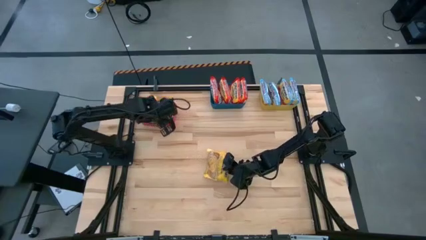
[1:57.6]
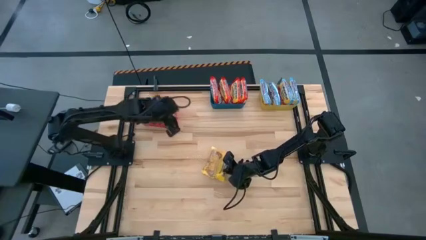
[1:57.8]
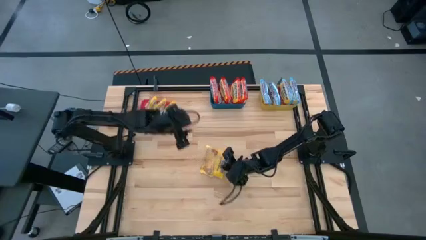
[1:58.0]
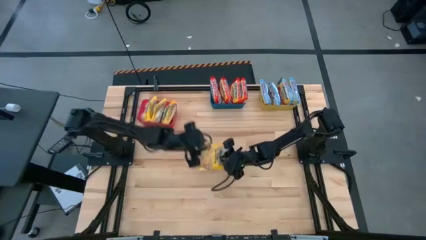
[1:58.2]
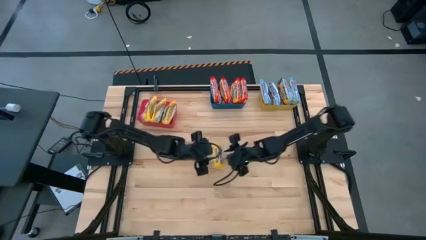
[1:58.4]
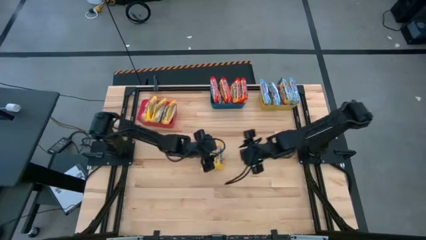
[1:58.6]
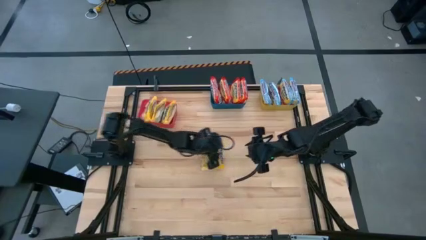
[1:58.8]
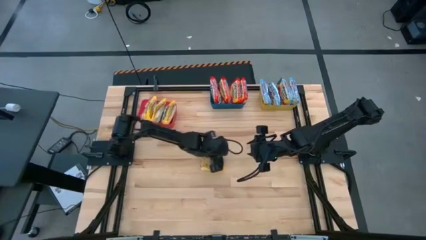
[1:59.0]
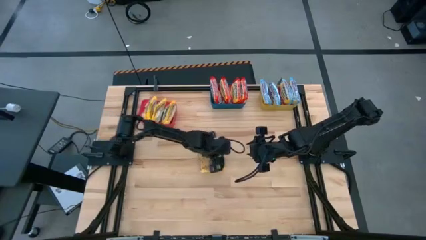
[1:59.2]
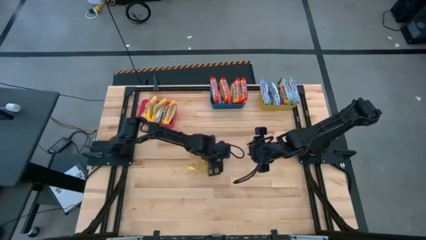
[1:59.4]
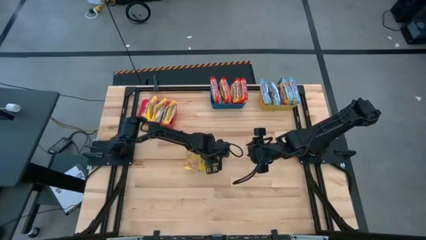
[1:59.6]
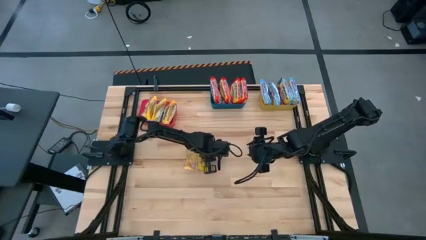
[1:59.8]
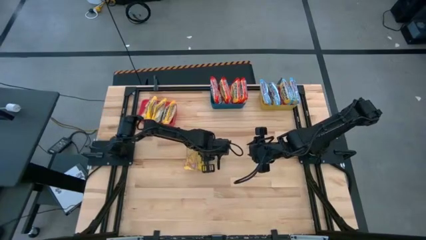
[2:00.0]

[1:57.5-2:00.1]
Task: Sort Maruchan noodles
Put the yellow noodle pack into the red bin

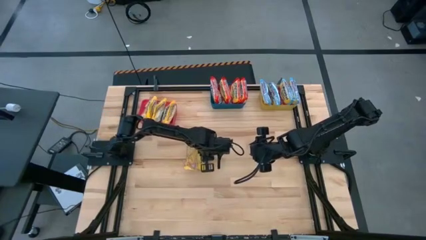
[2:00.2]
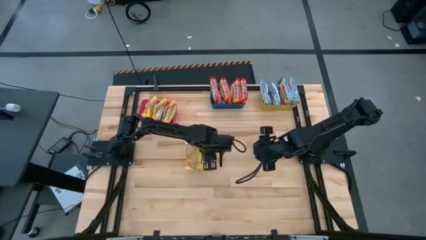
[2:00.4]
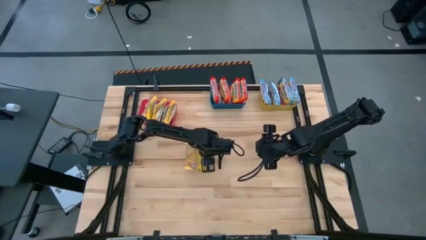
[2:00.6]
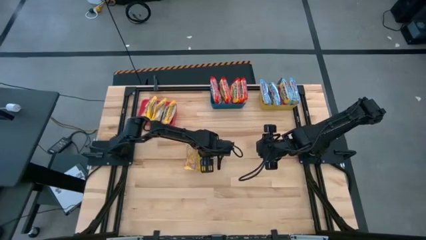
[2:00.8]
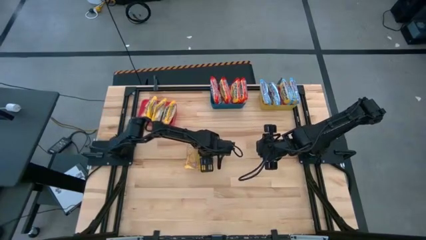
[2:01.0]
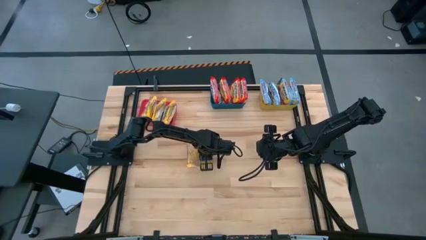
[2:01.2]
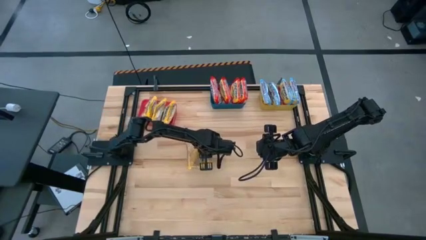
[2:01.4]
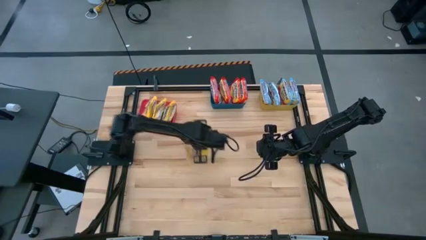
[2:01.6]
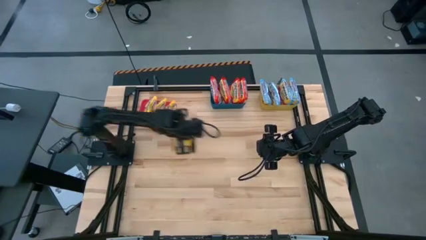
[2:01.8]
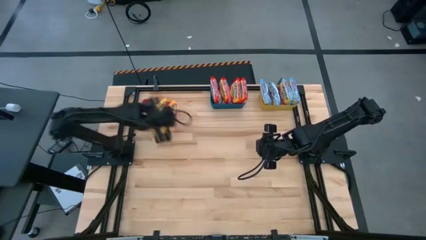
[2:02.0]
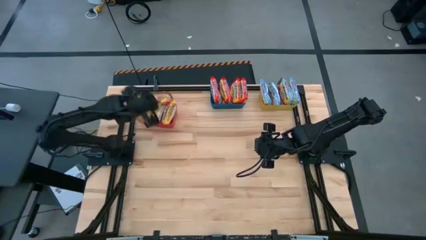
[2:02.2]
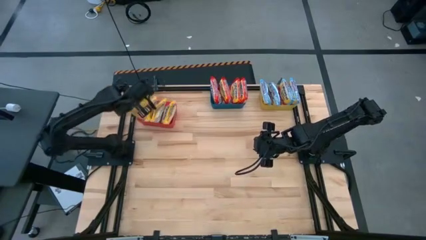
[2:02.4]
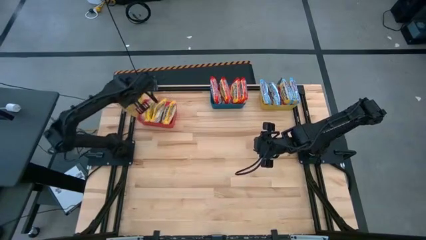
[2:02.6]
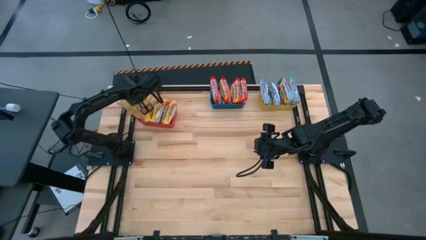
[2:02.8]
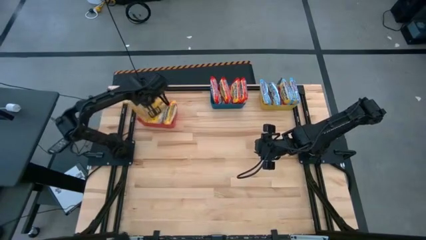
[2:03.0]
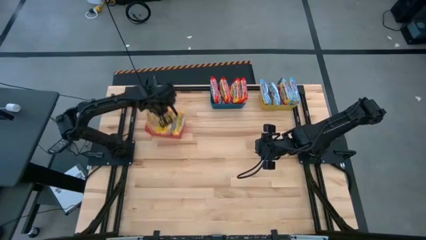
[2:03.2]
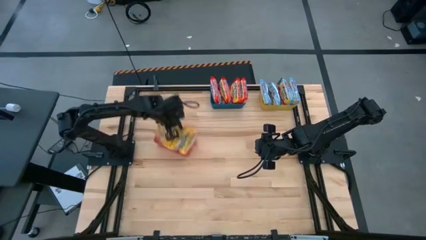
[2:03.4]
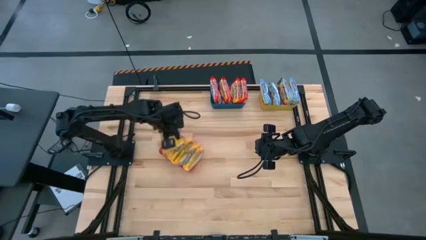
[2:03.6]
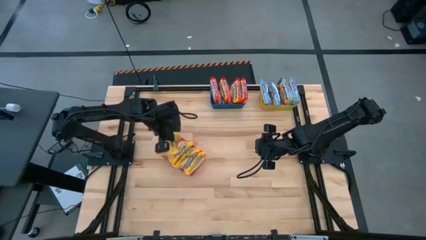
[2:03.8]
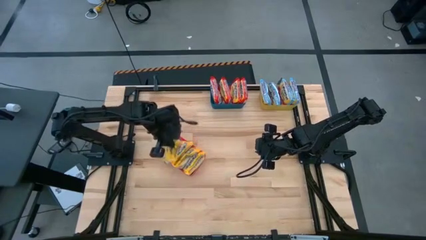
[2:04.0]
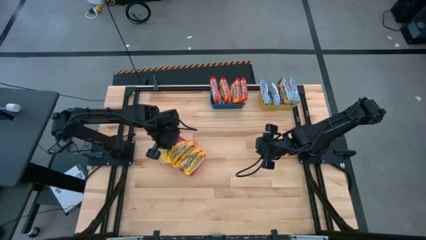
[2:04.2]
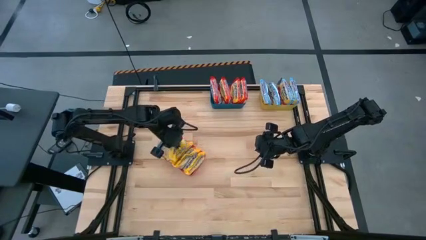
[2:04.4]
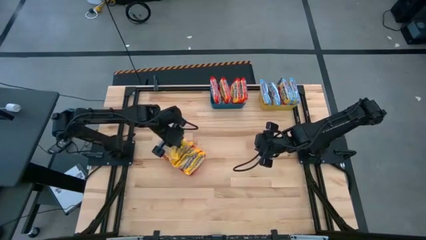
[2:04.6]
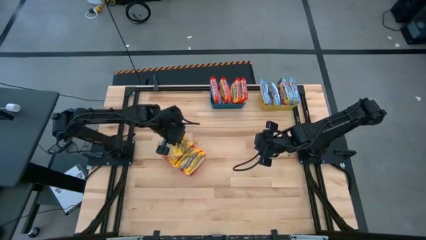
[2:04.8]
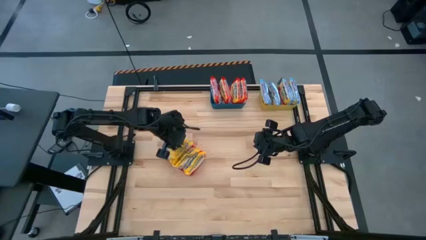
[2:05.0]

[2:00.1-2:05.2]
Put the yellow noodle pack into the red bin

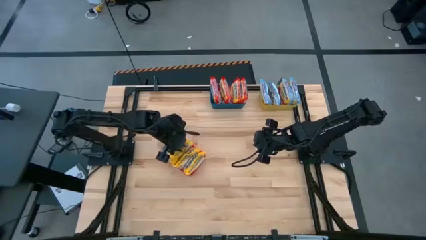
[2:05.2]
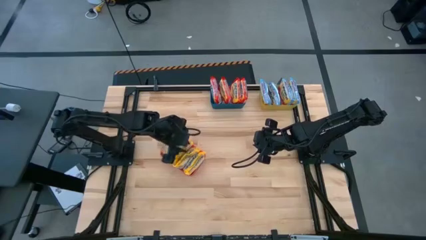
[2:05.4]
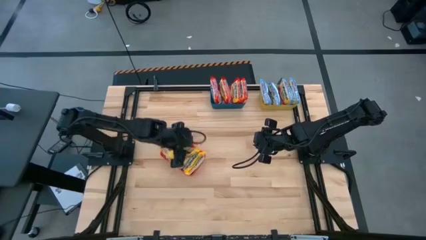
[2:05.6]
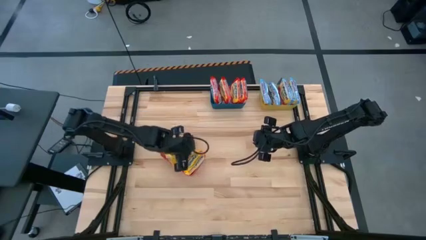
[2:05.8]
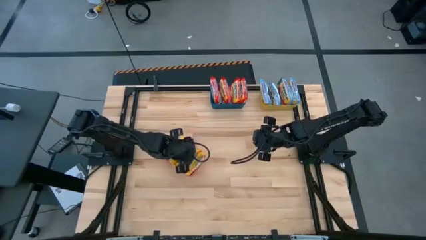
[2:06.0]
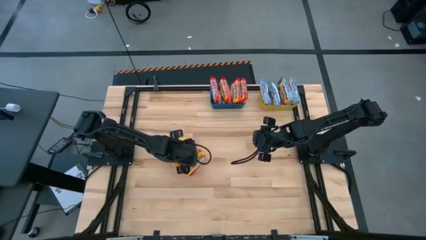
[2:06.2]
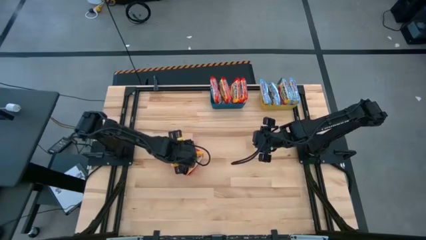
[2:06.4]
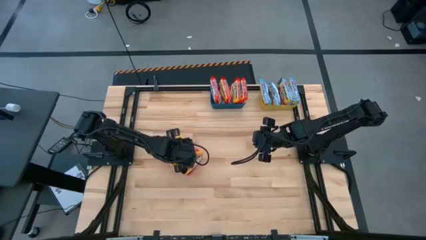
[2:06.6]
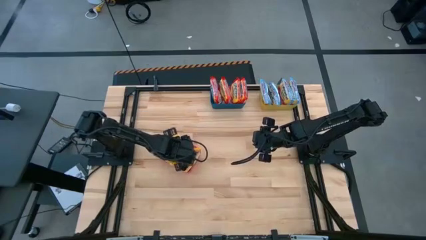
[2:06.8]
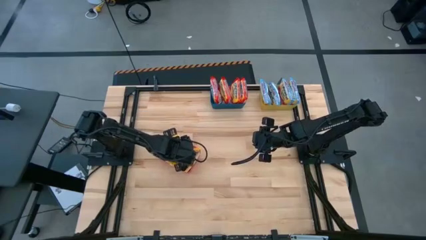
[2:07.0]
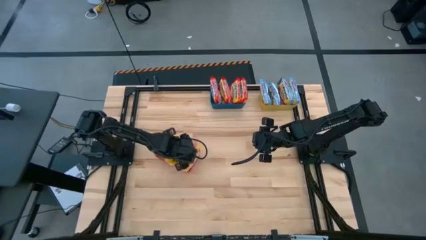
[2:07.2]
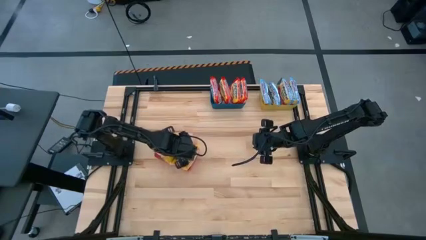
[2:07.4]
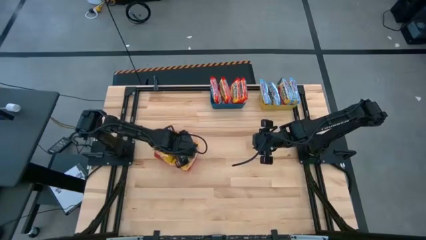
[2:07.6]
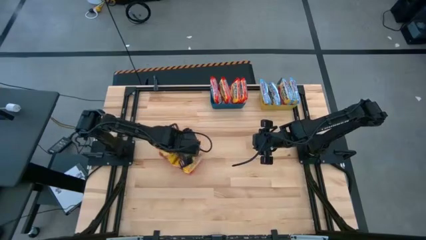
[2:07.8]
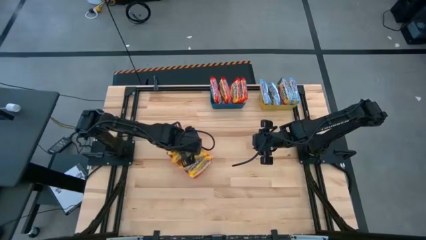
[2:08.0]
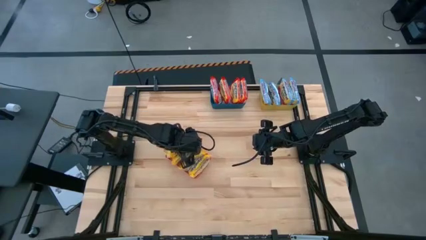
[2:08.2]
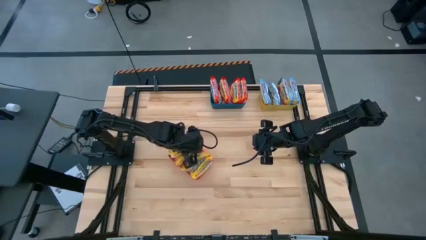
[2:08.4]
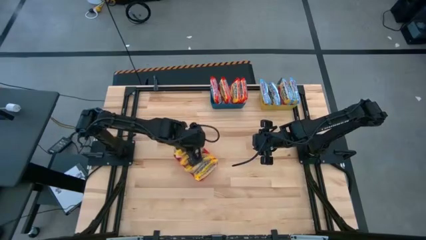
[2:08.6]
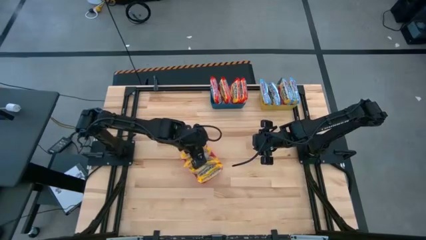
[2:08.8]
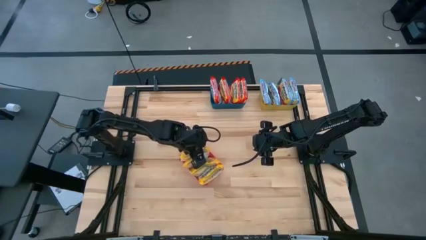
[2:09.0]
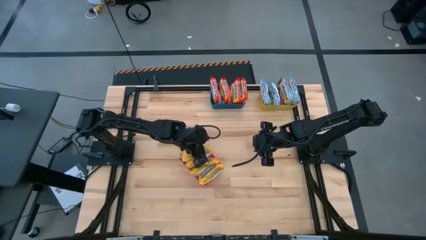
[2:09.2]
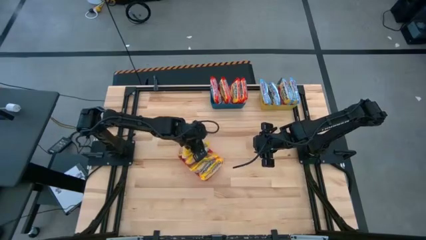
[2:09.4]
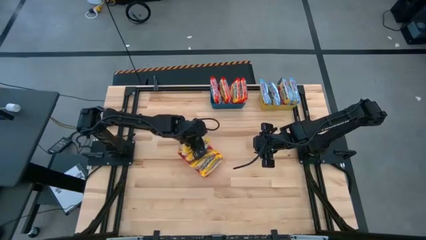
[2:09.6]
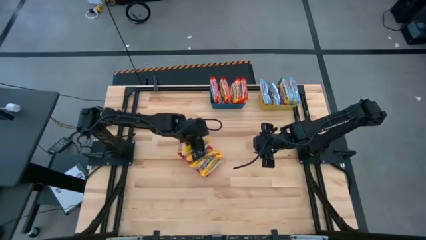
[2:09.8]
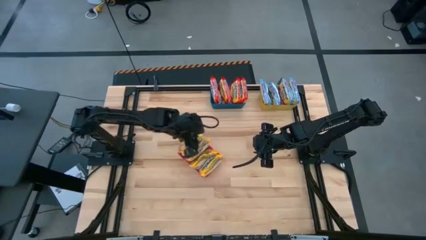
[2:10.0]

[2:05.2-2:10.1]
Adjust the yellow noodle packs on the red bin

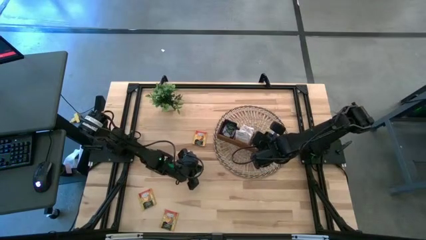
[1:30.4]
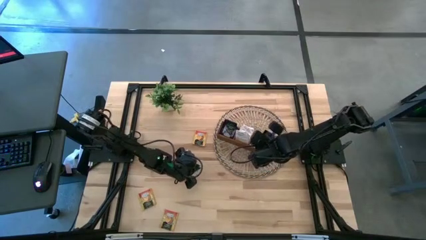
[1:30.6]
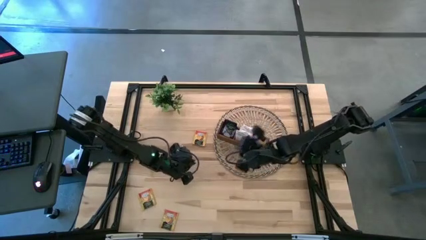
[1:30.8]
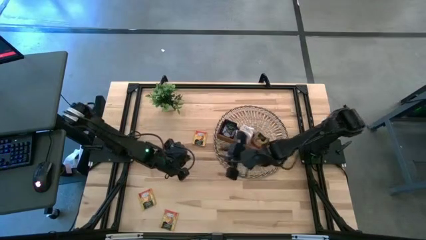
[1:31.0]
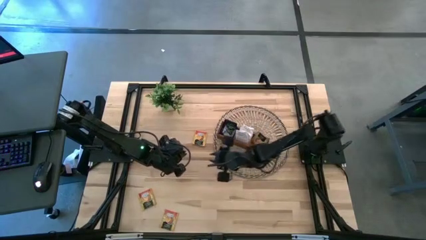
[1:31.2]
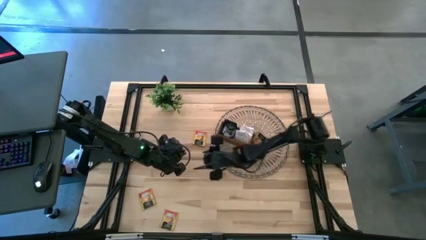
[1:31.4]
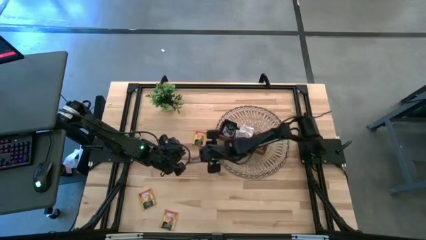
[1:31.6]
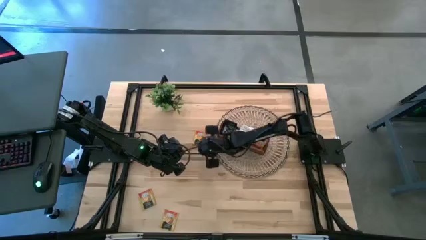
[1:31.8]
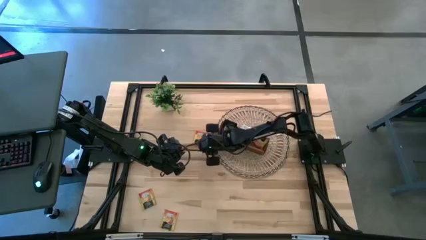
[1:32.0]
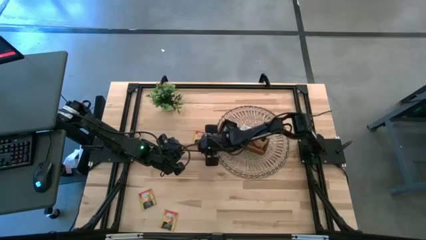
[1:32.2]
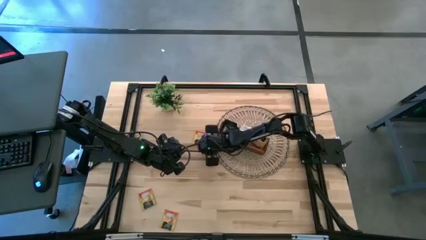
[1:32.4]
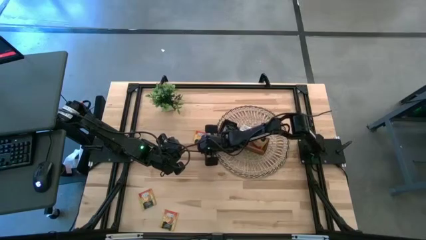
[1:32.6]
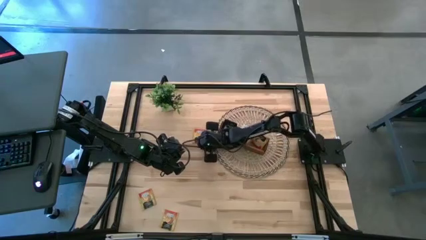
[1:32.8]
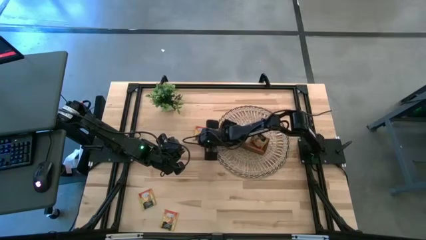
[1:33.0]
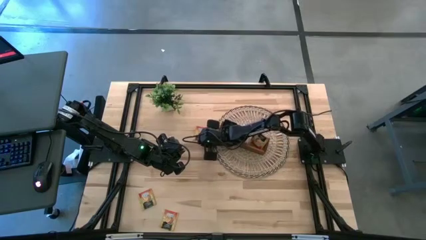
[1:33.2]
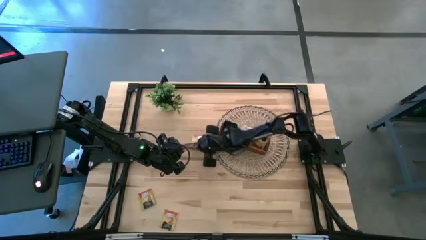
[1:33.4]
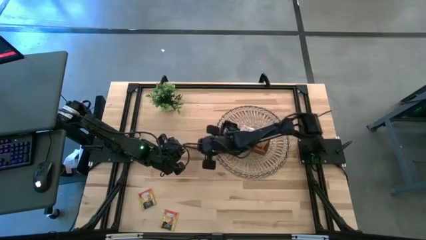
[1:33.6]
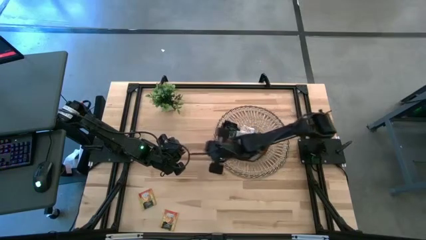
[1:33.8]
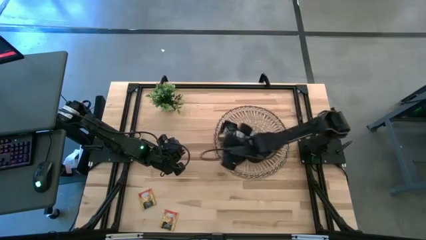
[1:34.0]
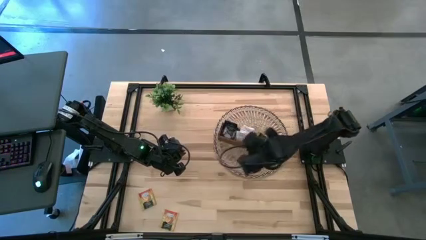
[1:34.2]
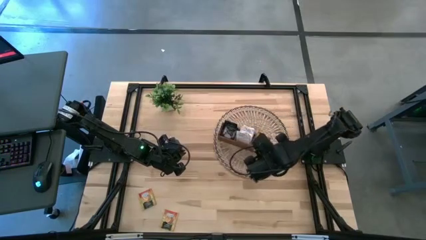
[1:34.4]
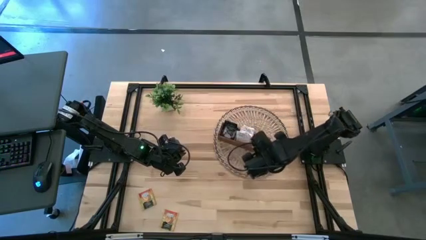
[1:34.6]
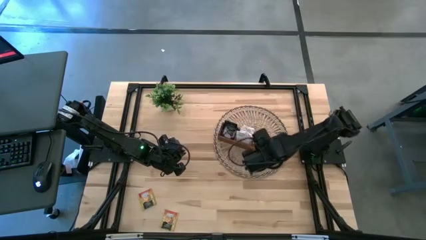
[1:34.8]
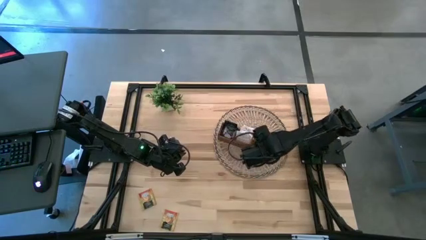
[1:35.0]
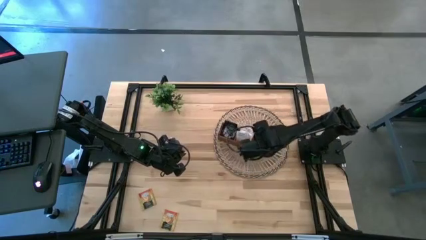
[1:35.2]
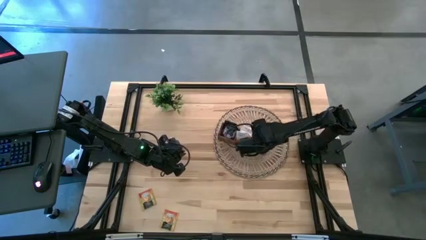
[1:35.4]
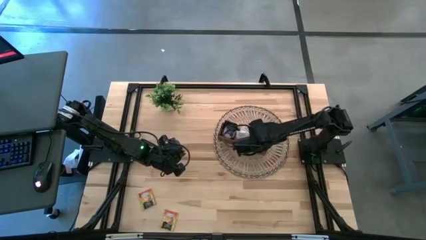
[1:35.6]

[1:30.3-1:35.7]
Task: Pick & Place Tea
Put the orange tea bag into the right section of the wooden organizer
